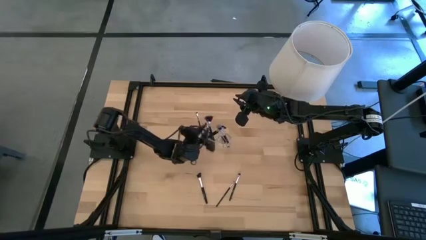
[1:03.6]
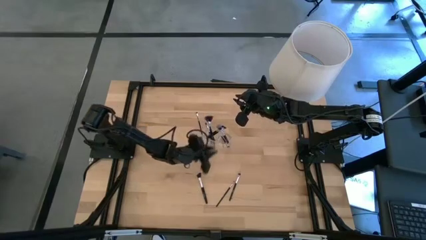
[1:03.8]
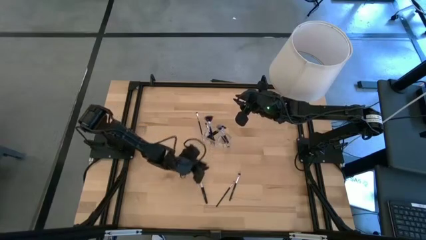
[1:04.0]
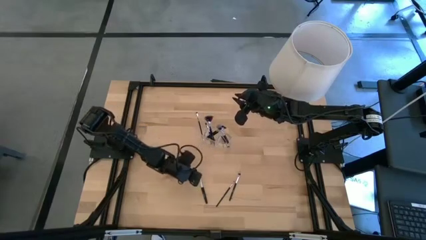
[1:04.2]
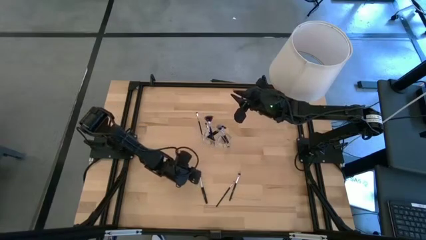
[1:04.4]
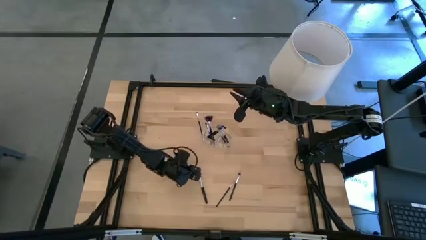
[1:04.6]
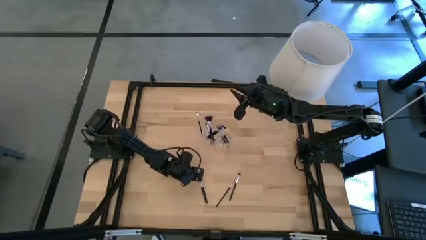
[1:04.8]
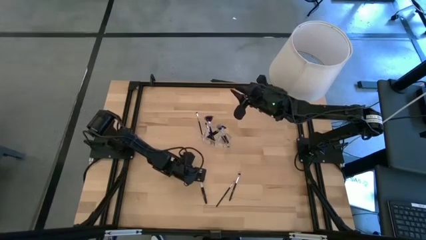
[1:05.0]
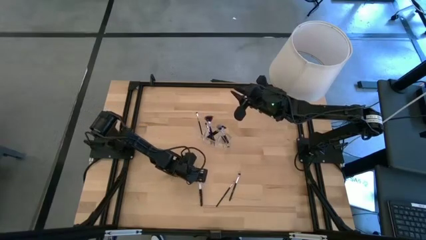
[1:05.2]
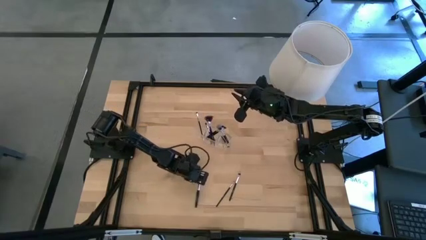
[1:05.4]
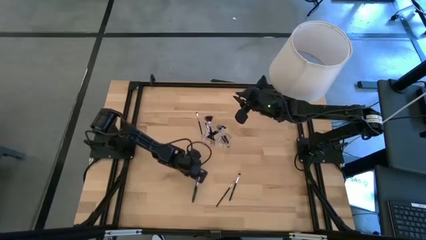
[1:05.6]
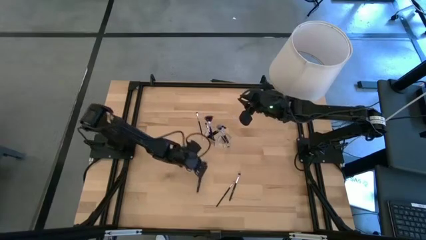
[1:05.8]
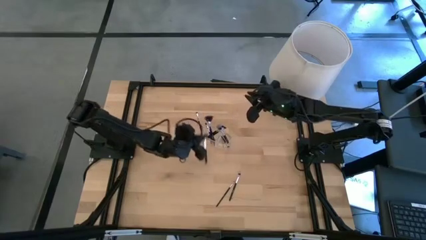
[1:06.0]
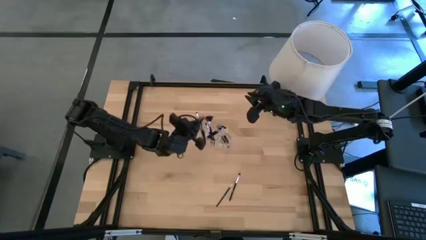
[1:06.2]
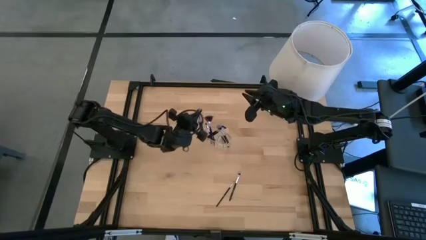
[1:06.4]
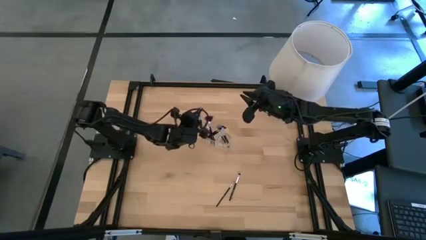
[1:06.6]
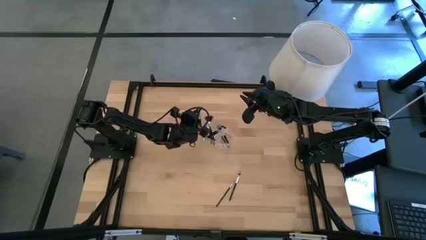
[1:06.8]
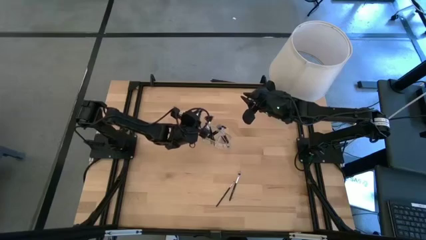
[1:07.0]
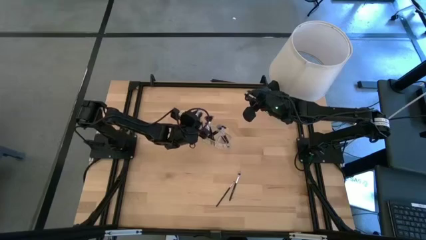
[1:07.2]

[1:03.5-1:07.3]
Task: Put items in baskets/containers
Put the powder brush into the transparent organizer

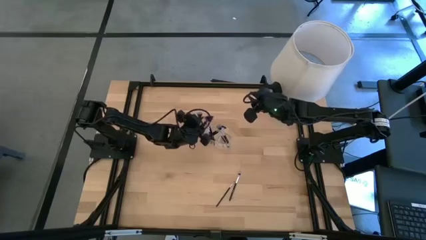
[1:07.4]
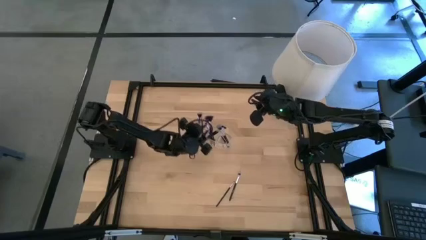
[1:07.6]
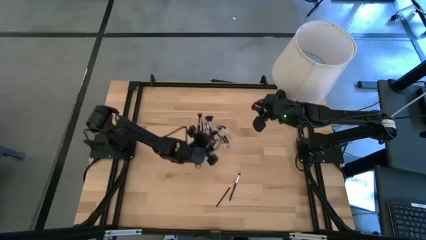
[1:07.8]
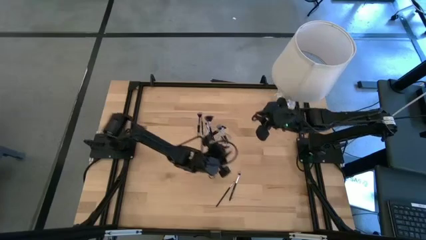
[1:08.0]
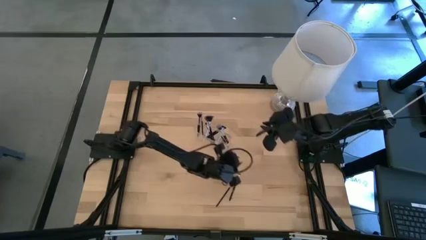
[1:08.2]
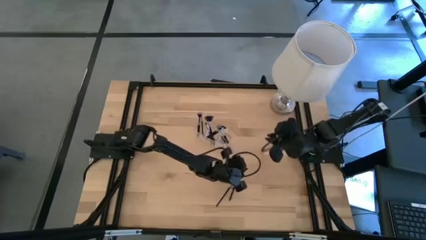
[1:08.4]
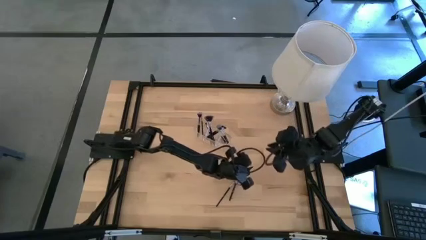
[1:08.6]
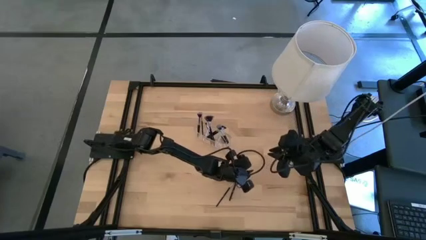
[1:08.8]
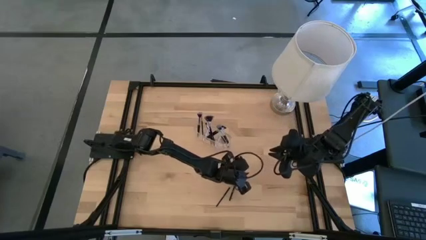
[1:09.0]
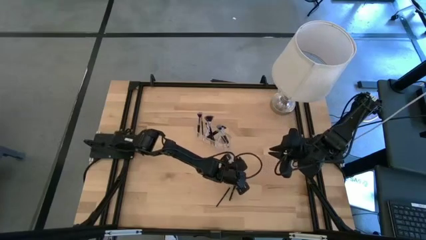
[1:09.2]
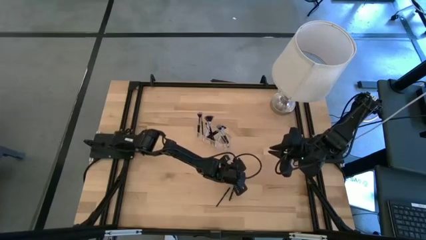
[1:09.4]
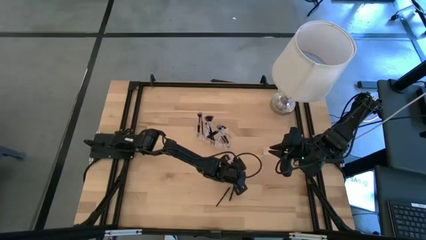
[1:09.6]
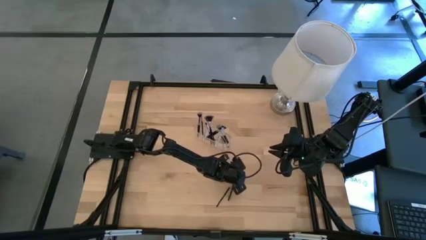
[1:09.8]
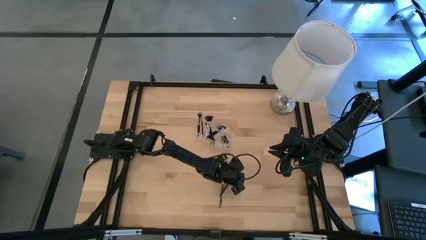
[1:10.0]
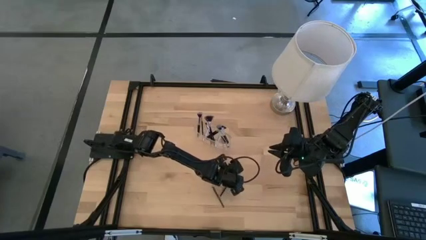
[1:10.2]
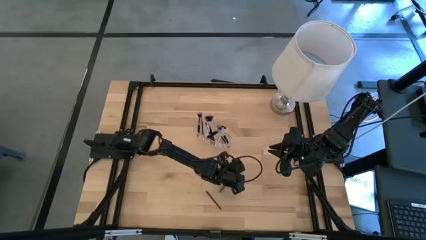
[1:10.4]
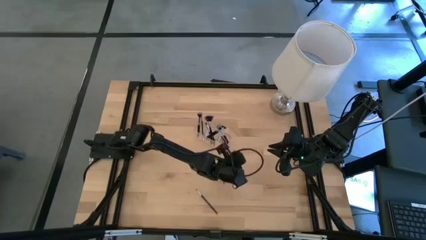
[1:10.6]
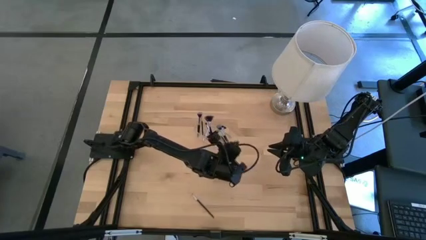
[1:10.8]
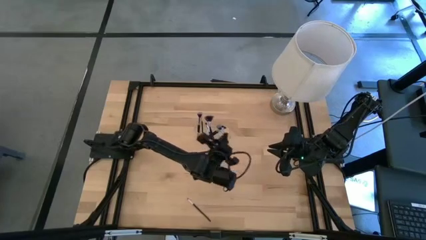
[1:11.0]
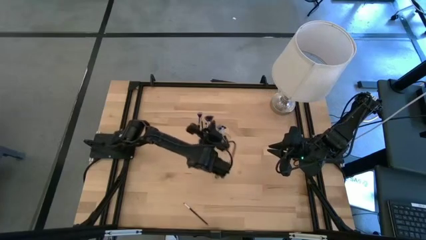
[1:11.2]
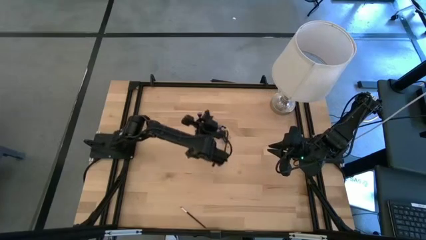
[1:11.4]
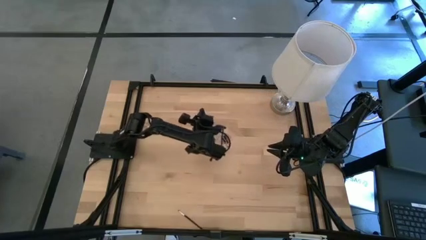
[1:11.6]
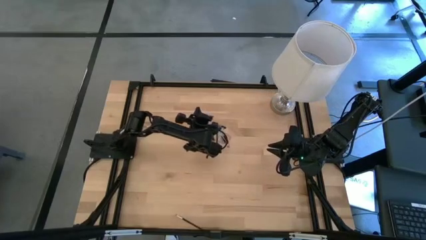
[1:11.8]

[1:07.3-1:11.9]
Put the eyeshadow brush into the transparent organizer

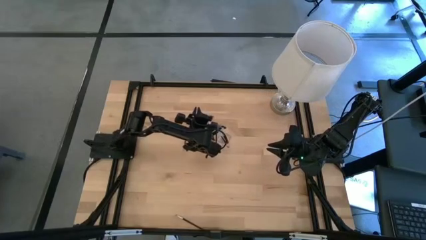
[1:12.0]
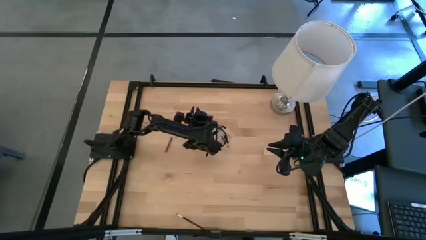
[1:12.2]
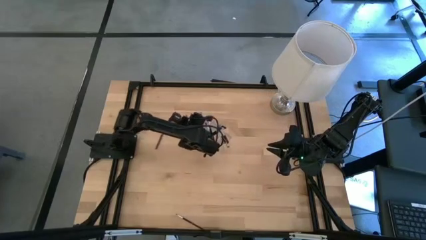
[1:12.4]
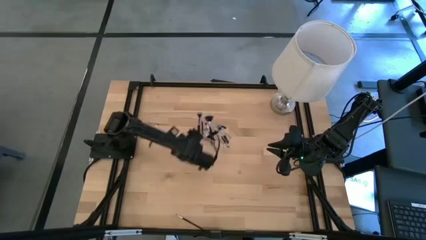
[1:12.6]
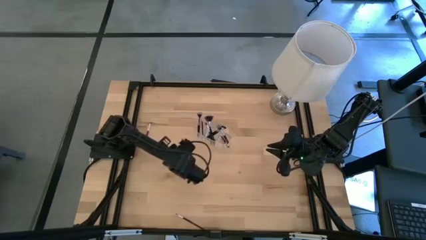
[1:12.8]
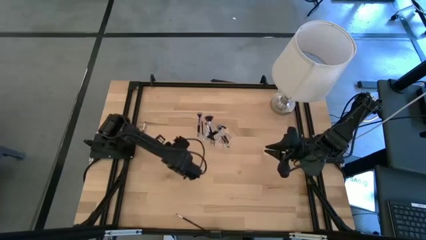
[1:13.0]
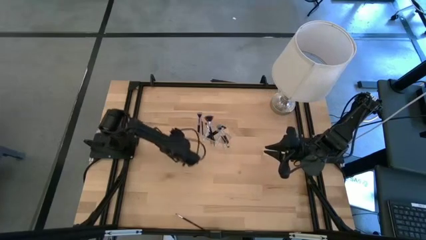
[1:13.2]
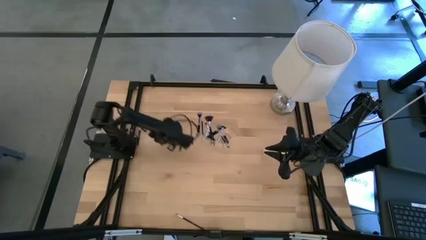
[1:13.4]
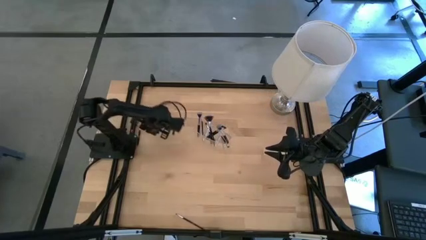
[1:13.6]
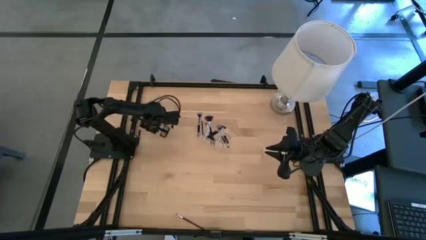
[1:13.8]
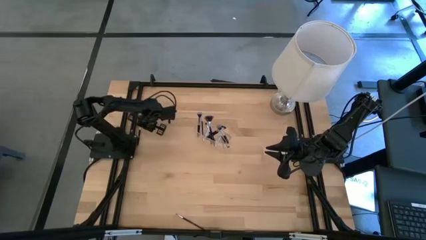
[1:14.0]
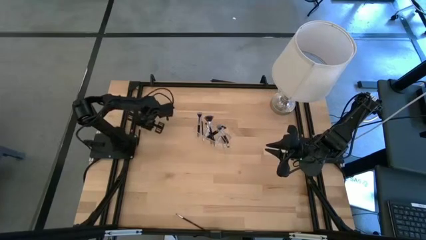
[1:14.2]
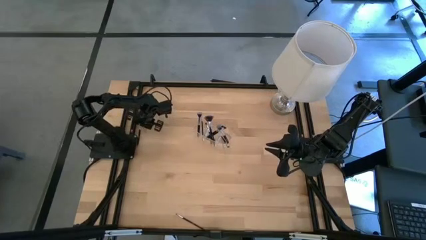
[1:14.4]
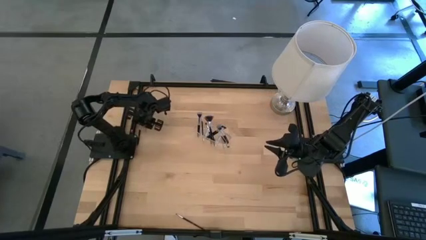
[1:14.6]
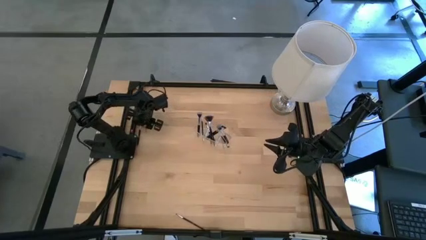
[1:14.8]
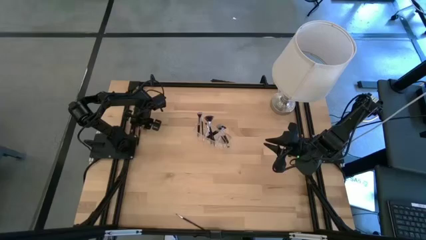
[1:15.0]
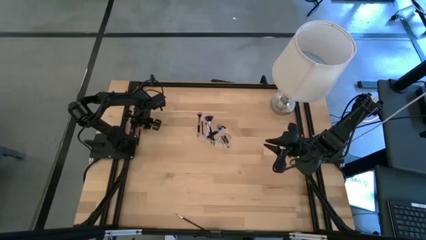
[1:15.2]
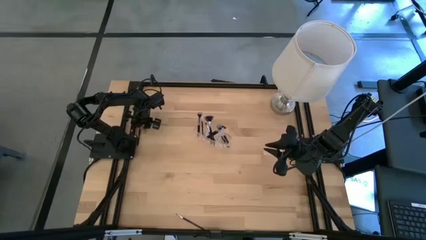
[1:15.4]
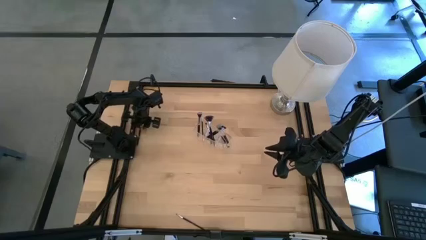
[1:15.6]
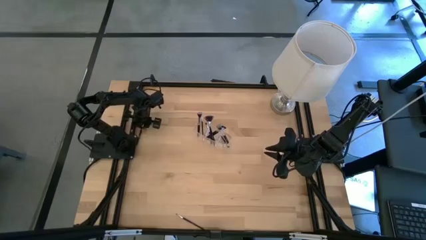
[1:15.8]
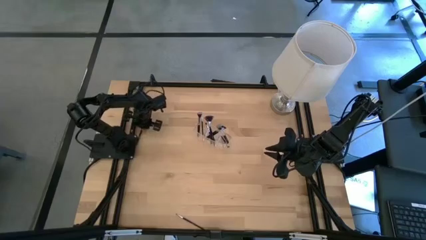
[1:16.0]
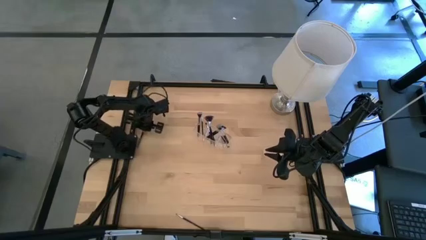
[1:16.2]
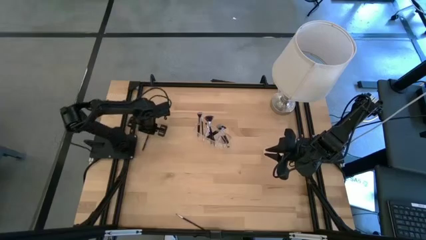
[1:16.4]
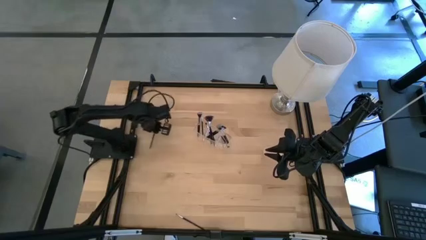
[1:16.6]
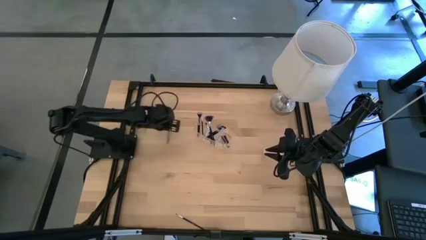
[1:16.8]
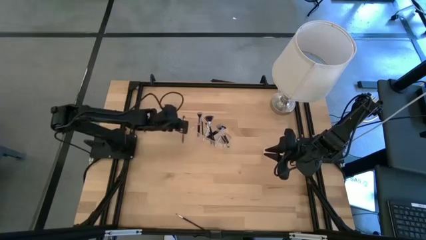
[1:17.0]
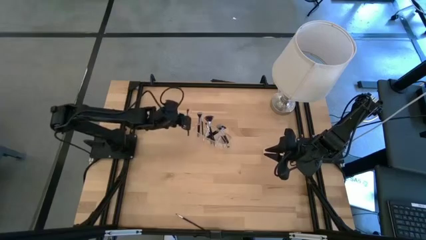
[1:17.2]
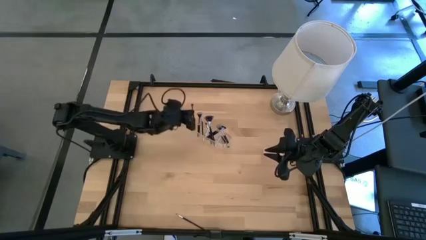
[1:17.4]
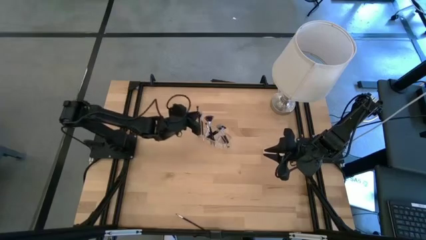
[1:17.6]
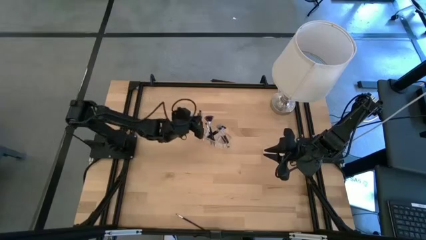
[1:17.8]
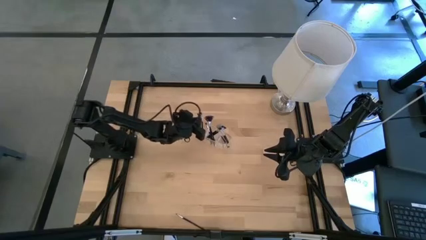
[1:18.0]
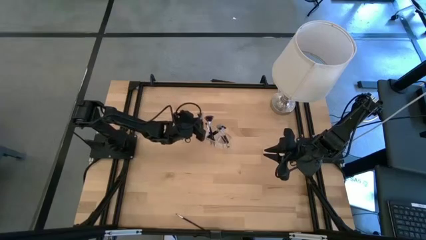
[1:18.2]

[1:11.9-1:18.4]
Put the eyeshadow brush into the transparent organizer

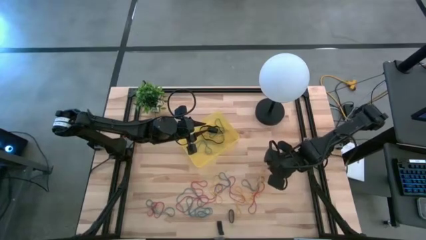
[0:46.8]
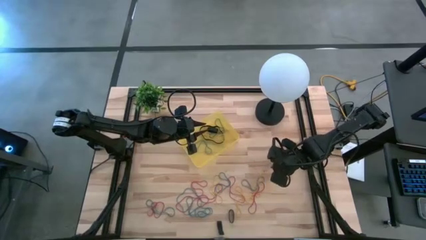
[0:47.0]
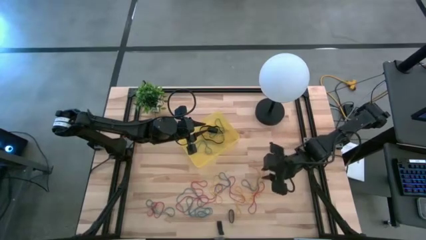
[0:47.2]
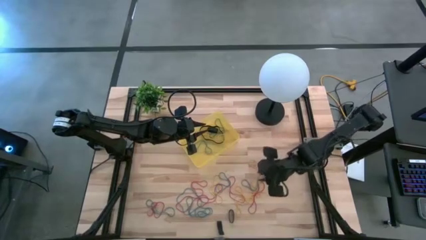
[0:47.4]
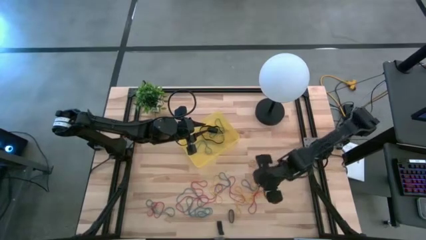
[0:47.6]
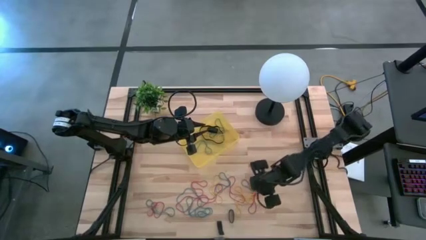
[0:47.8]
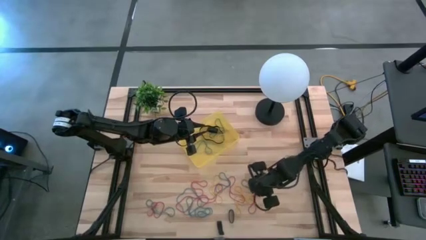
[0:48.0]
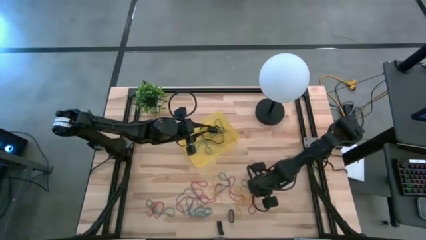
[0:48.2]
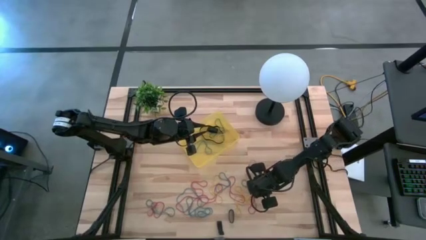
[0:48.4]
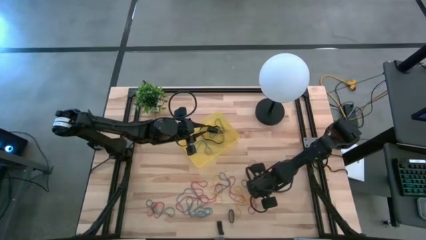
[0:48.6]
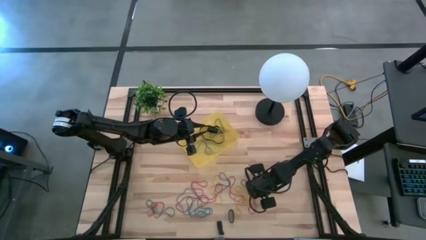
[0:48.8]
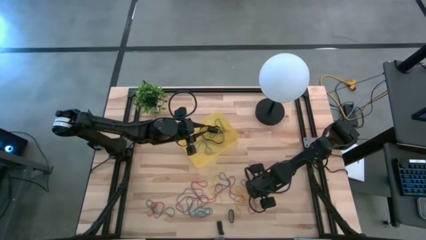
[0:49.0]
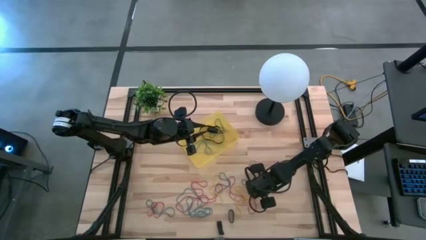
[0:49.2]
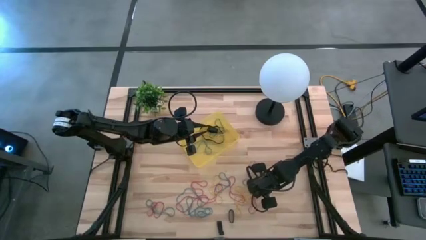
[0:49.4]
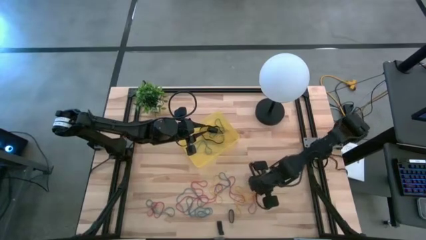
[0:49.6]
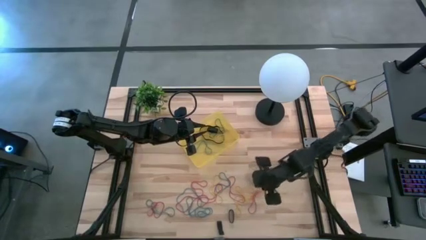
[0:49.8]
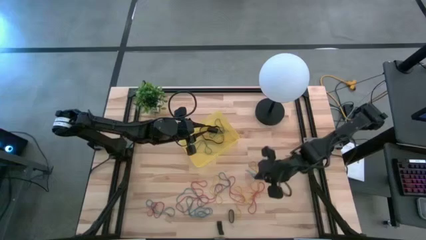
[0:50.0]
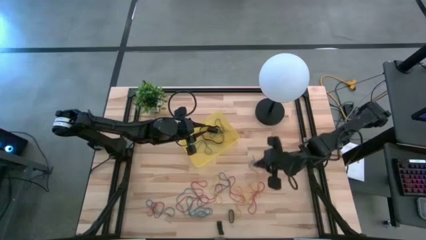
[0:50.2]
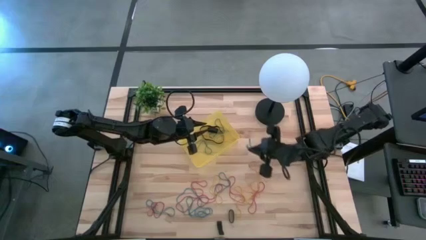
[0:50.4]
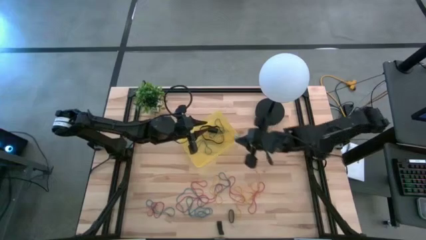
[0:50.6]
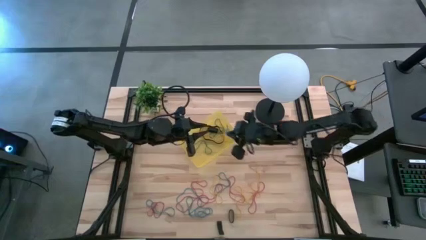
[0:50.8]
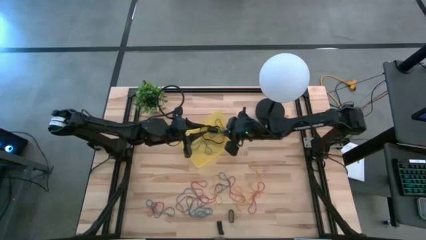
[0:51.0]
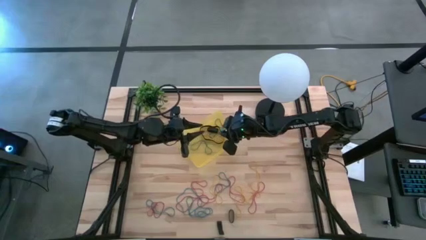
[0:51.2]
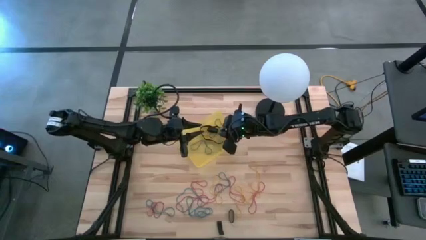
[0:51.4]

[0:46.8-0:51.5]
Task: Pick and place rubber bands into bin
Put the blue rubber band into the yellow bin
